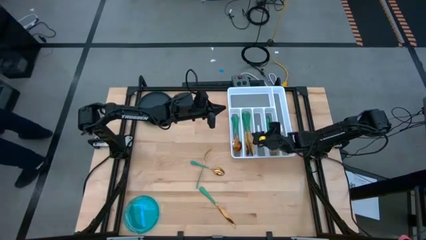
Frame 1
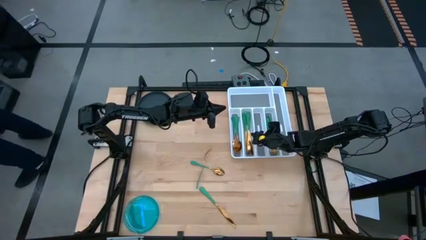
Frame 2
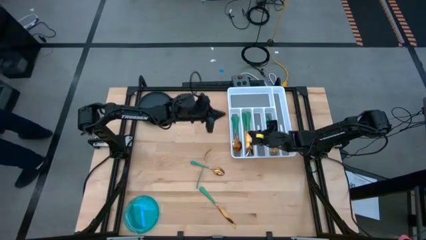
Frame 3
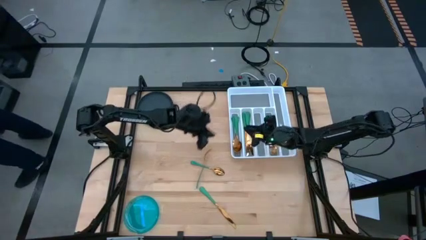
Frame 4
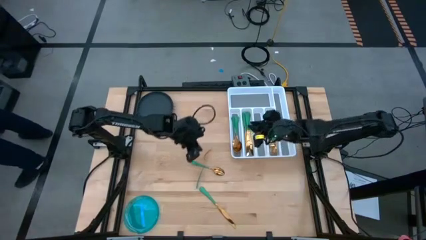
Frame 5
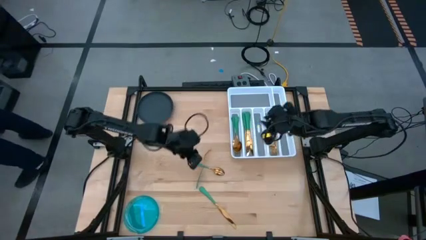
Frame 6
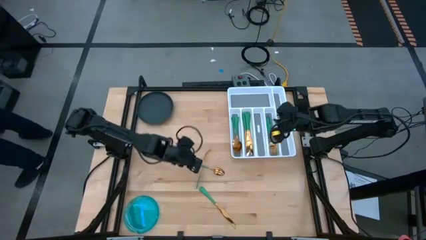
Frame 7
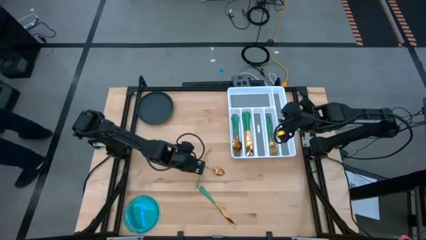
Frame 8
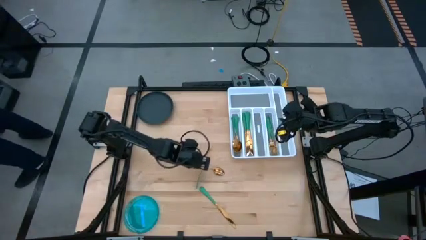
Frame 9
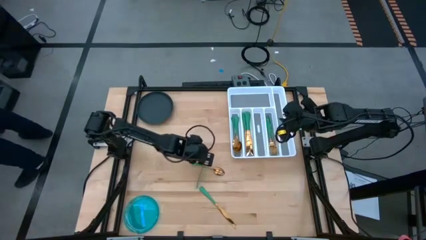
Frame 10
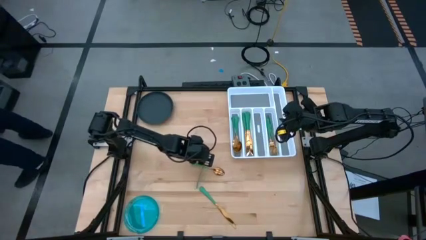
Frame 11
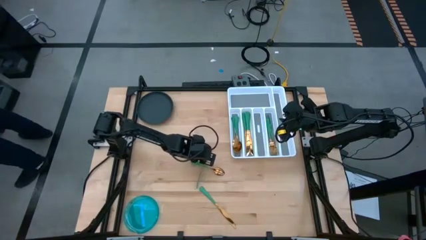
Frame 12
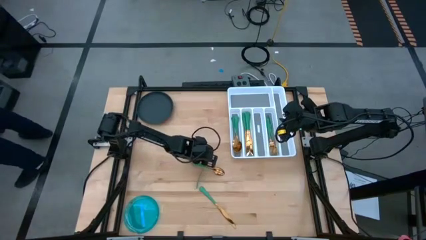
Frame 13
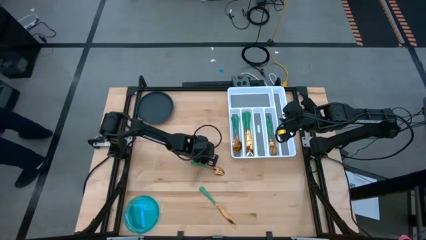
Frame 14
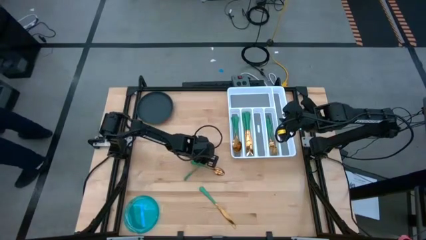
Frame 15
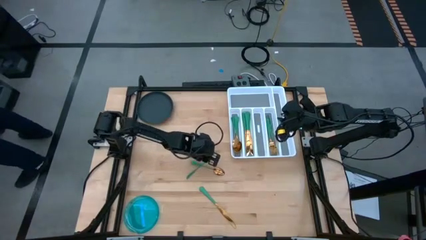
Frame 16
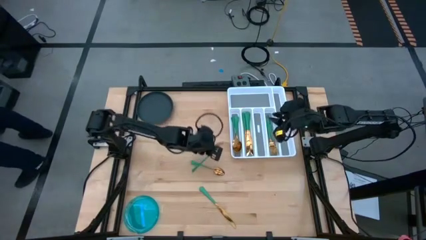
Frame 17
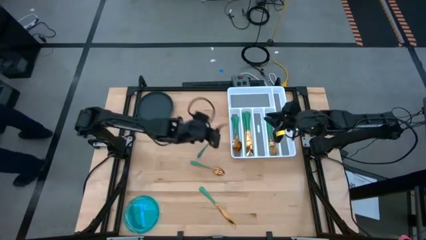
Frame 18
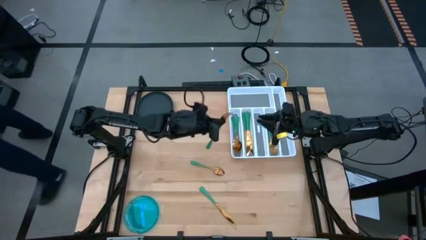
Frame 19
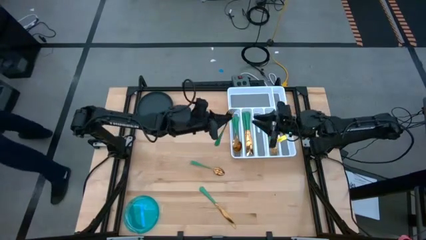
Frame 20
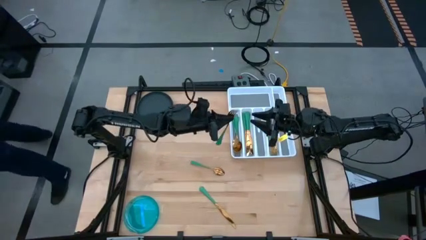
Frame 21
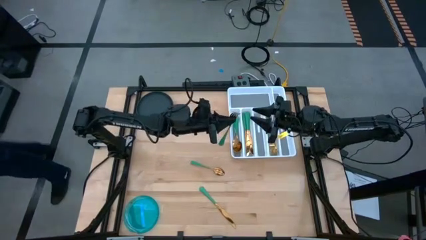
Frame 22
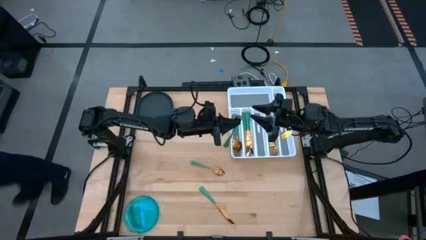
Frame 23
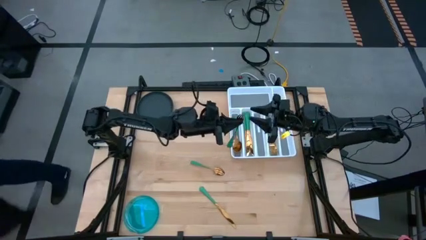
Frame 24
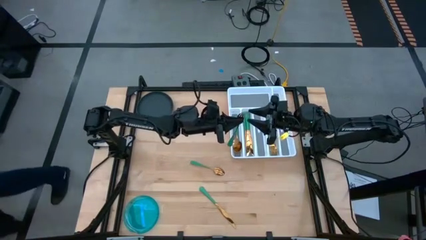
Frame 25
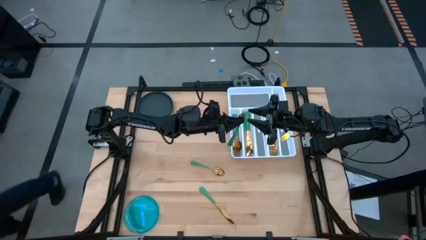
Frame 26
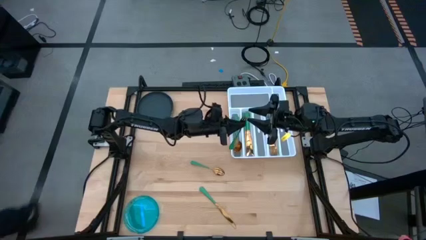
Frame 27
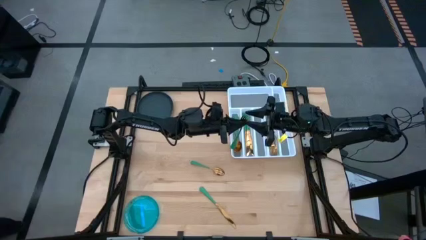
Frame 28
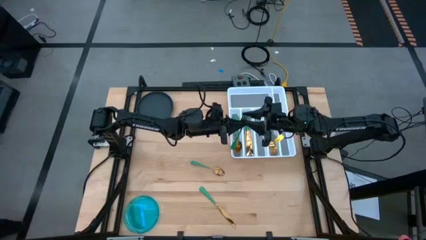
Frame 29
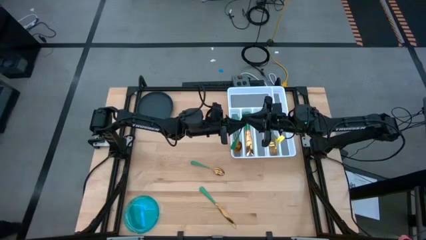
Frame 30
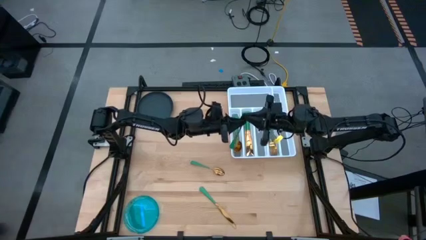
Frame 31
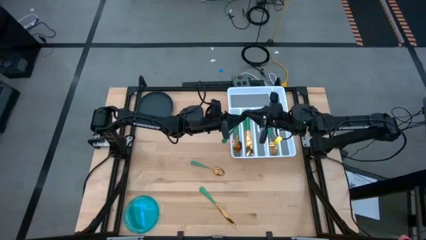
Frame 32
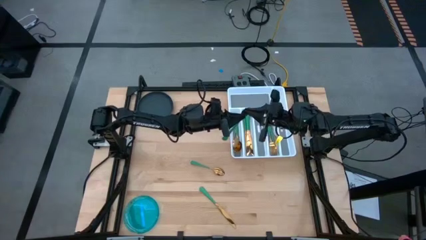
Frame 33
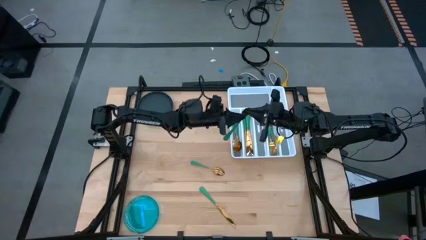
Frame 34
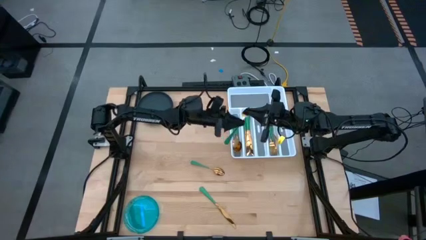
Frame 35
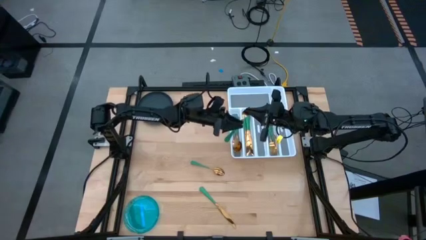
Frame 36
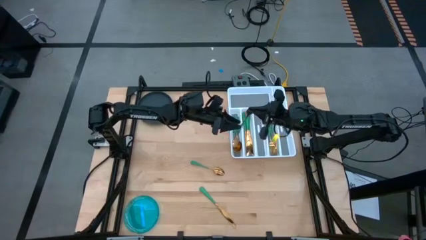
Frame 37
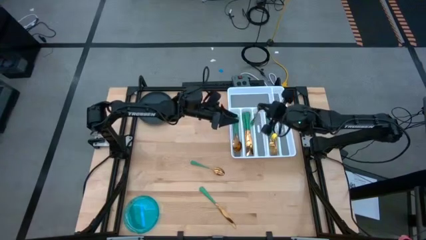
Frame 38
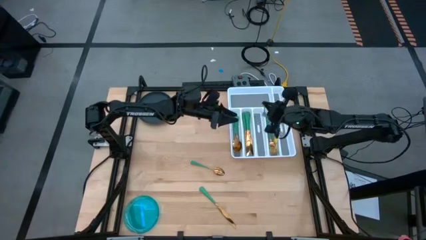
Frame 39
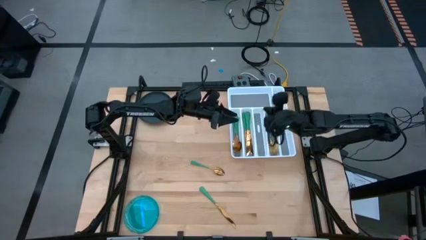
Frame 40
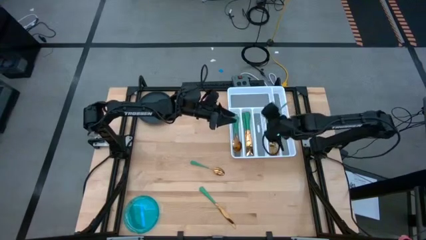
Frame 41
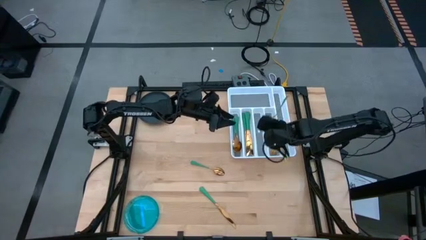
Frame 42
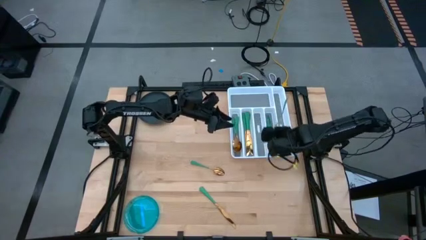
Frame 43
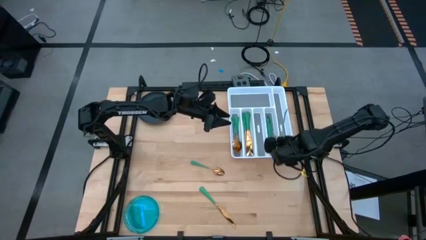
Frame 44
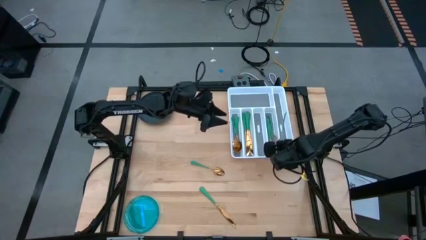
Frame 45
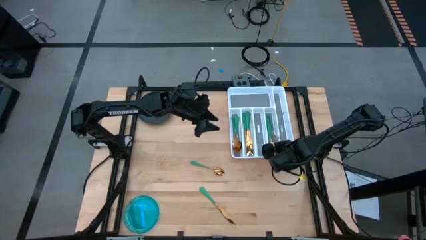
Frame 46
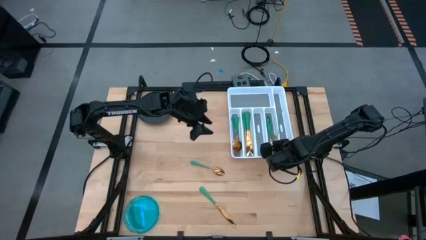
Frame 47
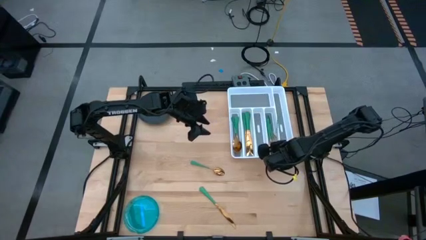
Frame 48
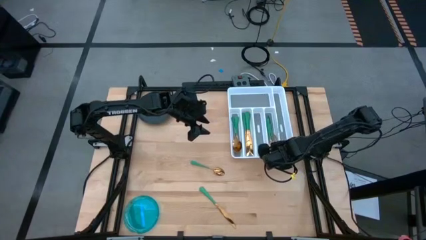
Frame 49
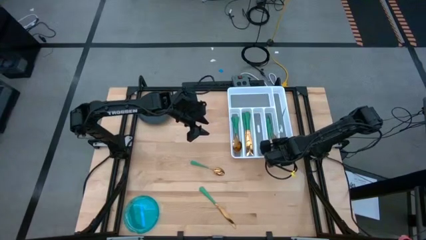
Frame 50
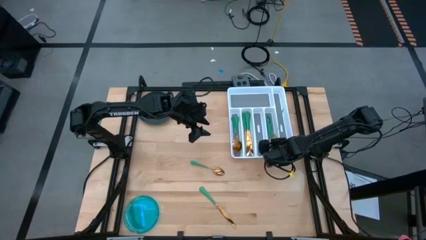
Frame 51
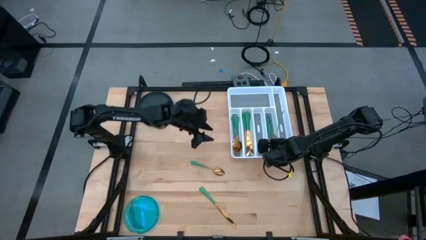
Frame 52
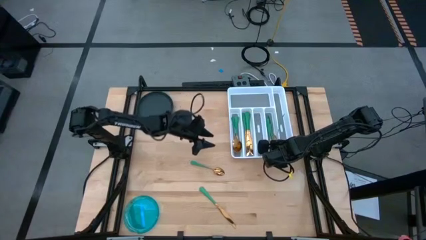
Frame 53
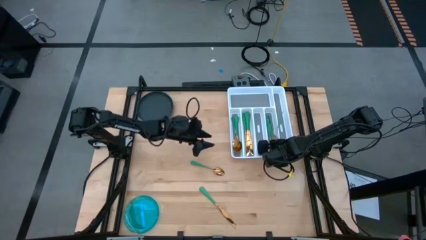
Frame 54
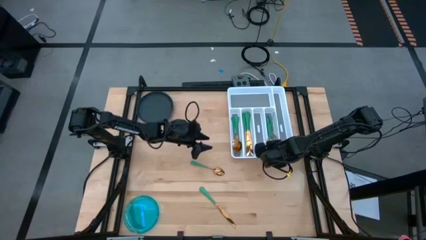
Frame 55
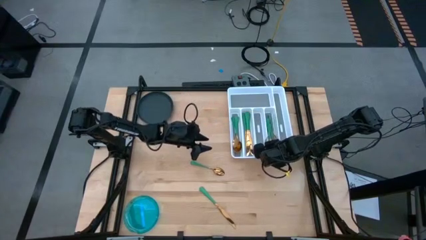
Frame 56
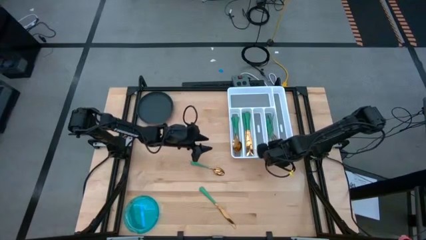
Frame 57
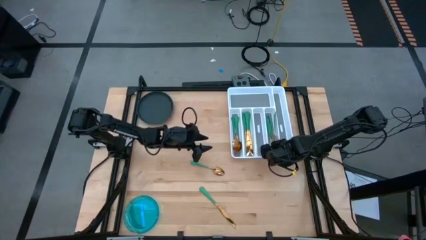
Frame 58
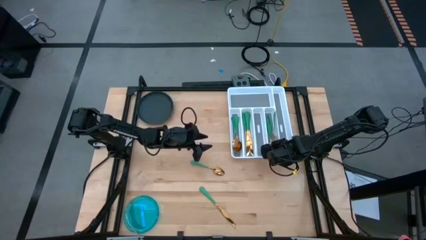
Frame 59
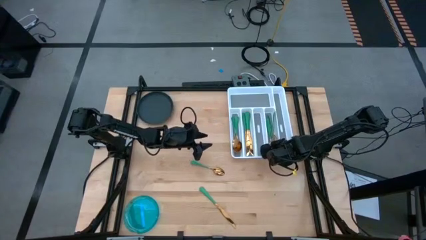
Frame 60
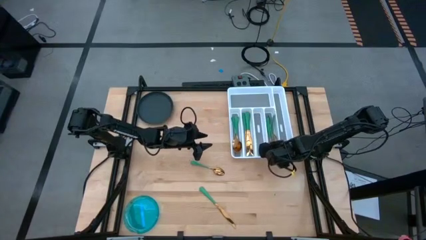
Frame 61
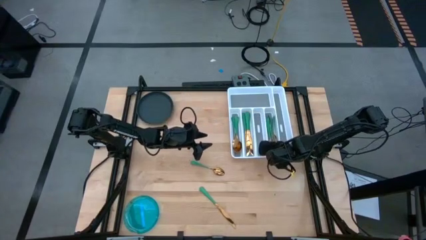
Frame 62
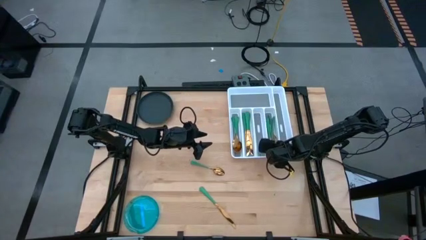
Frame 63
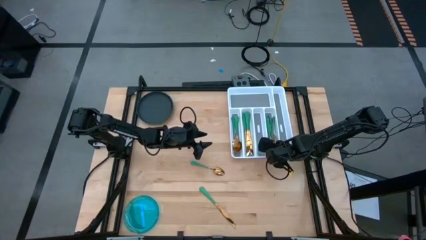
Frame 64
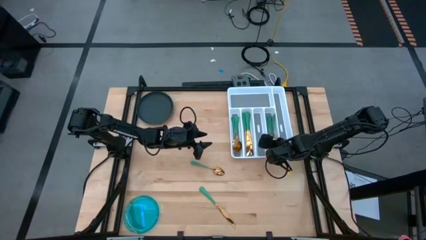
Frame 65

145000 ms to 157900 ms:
Task: Sort silverware
Put the green fork on the silverware tray with the other green forks

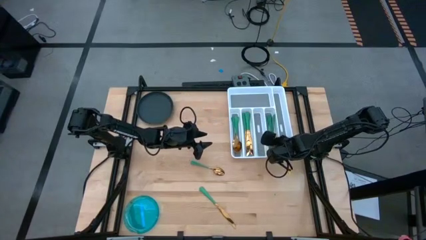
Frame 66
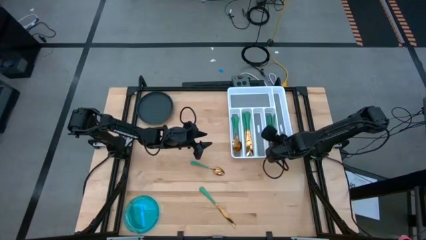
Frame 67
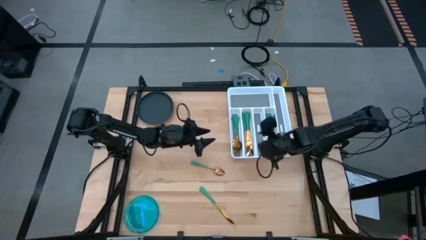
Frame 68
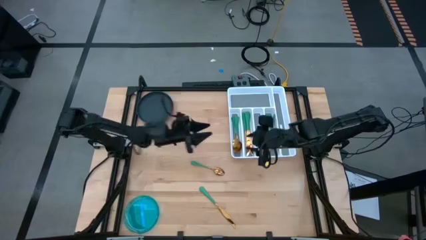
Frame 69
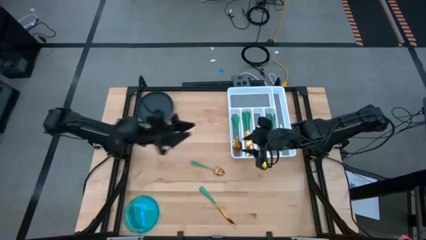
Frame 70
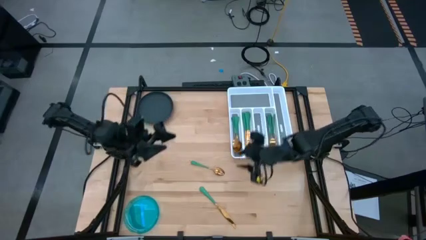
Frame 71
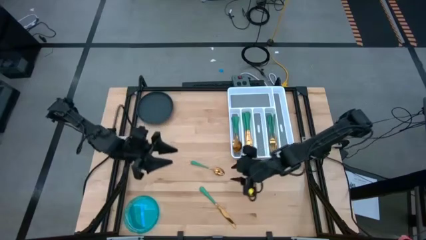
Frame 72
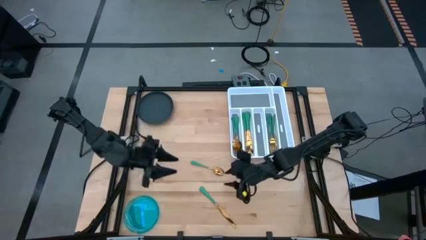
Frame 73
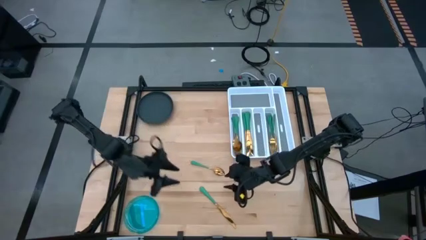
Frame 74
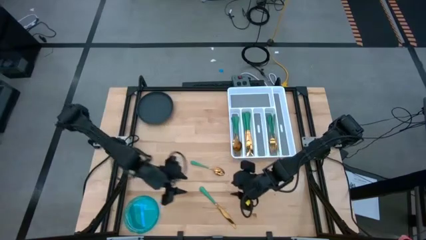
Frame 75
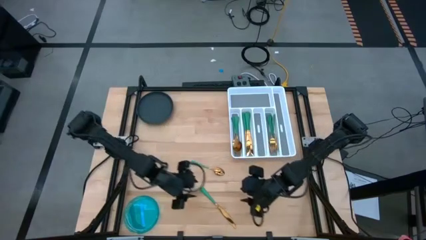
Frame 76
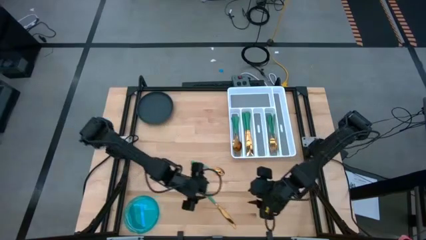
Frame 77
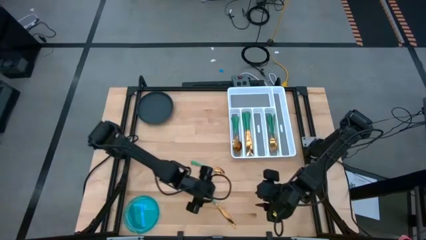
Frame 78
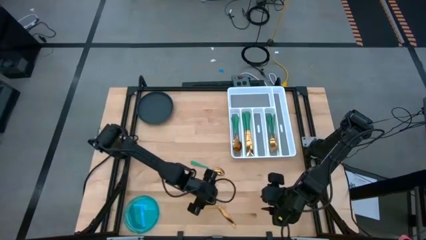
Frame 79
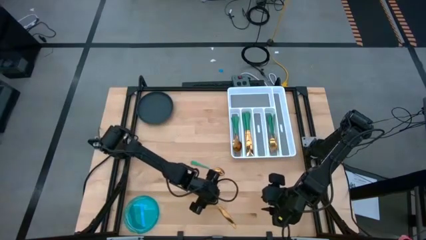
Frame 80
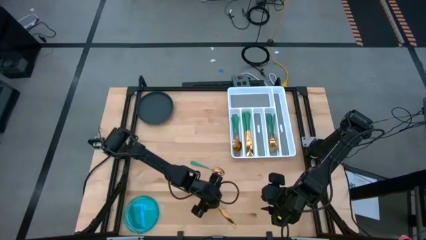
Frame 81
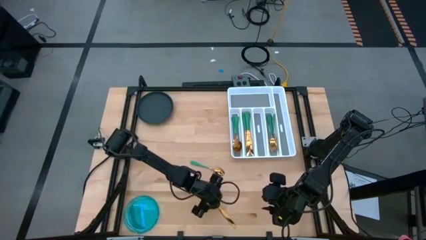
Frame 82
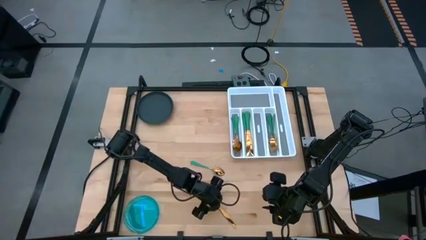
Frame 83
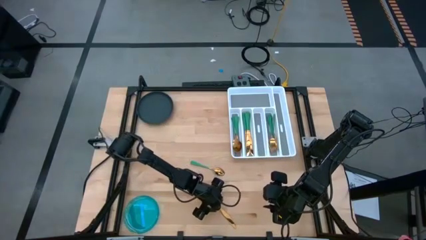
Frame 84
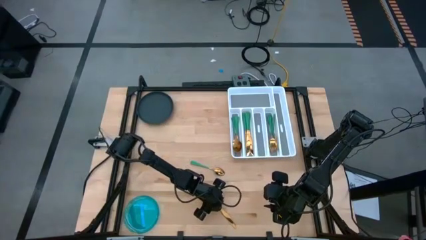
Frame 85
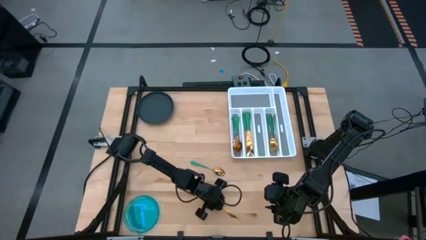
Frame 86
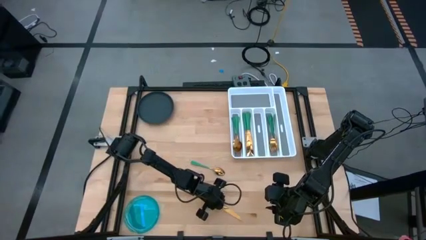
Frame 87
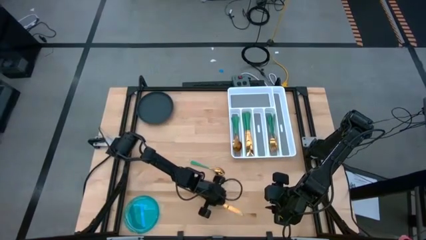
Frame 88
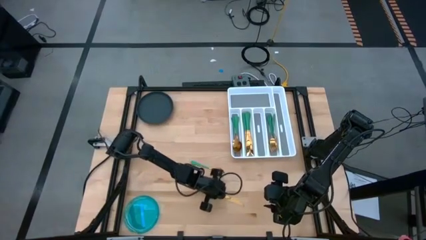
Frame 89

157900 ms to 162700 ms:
Put the green knife on the silverware tray with the other green knives
